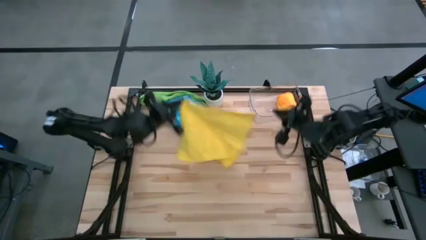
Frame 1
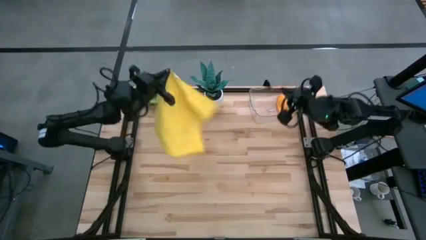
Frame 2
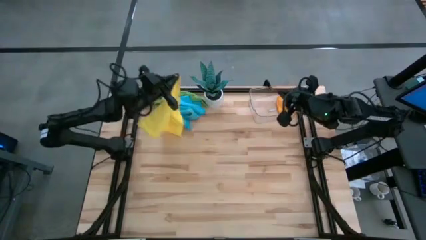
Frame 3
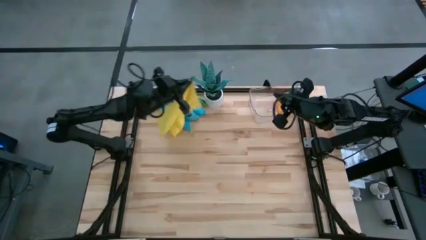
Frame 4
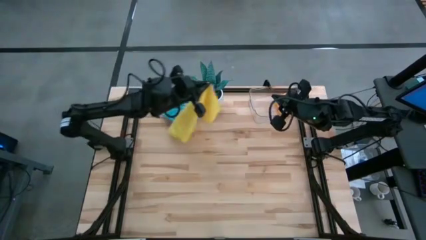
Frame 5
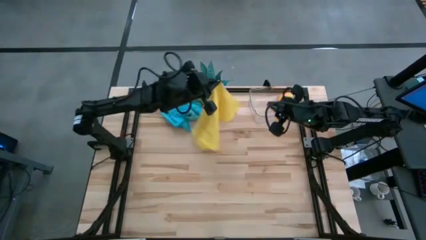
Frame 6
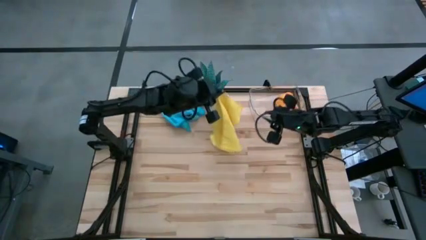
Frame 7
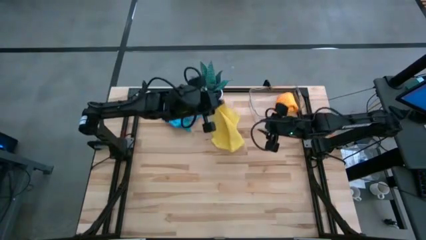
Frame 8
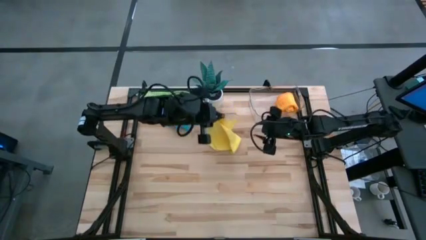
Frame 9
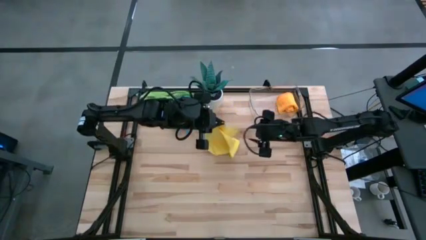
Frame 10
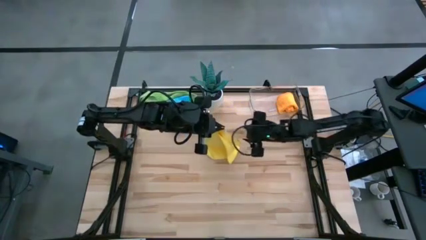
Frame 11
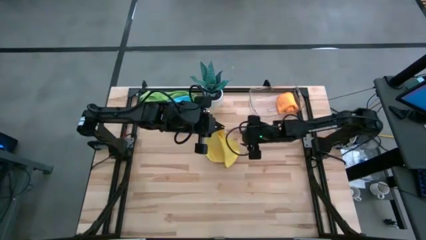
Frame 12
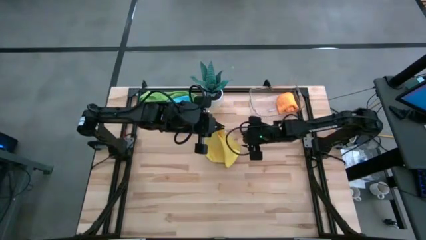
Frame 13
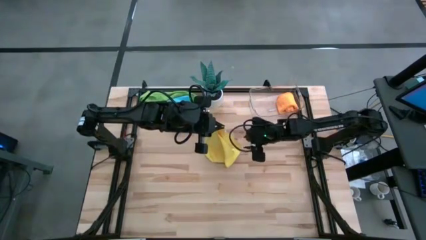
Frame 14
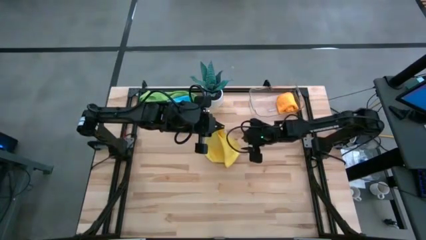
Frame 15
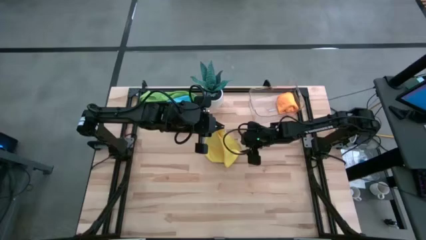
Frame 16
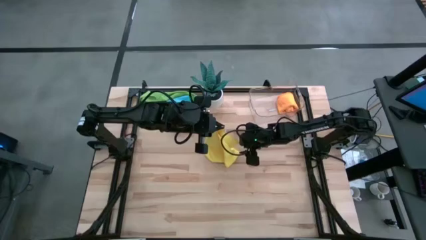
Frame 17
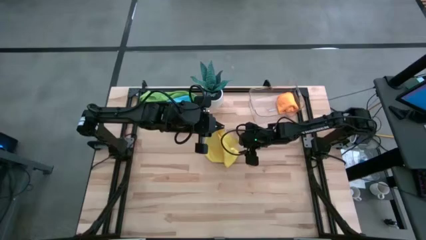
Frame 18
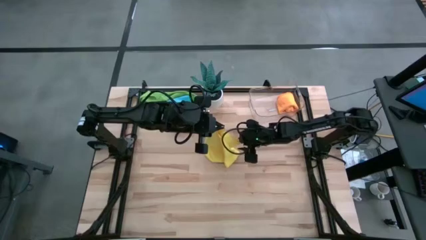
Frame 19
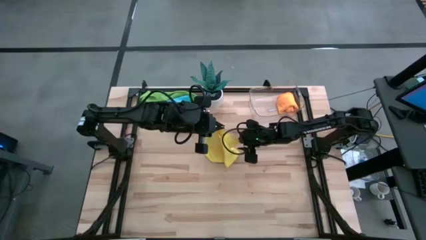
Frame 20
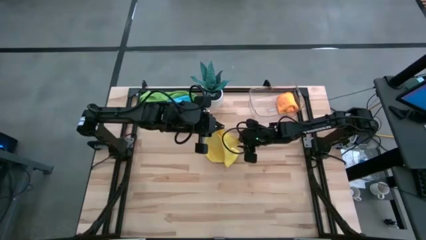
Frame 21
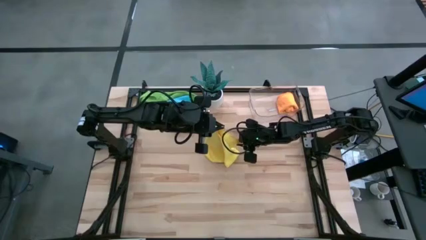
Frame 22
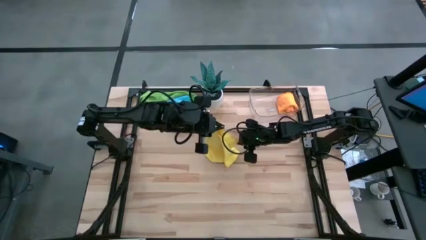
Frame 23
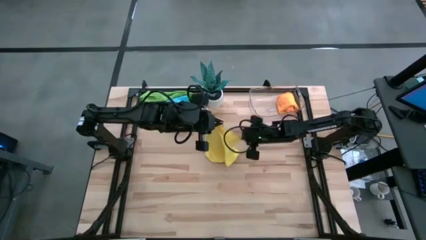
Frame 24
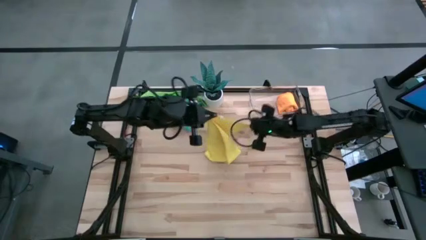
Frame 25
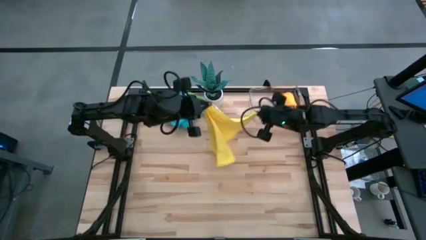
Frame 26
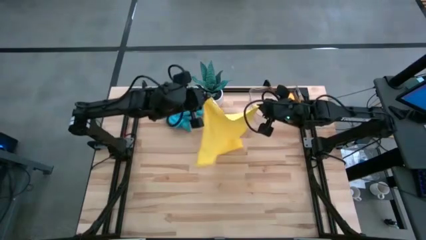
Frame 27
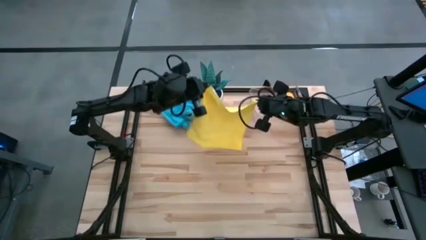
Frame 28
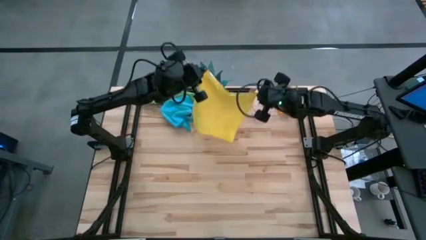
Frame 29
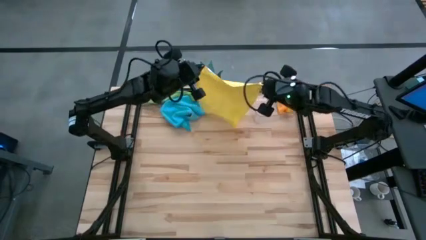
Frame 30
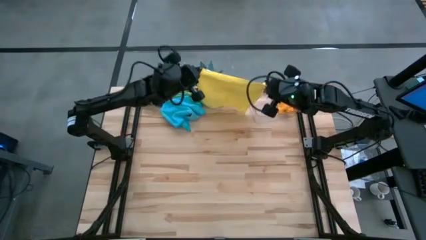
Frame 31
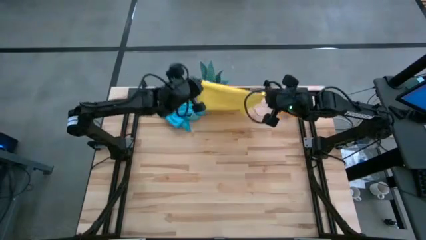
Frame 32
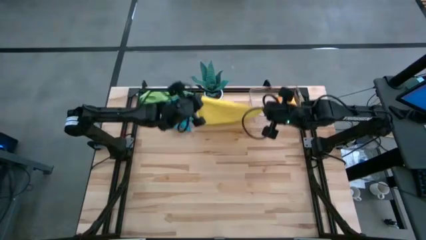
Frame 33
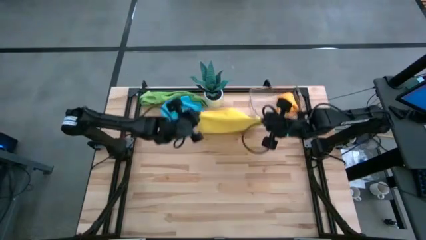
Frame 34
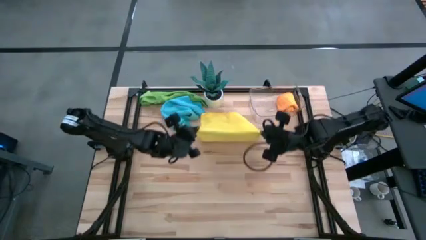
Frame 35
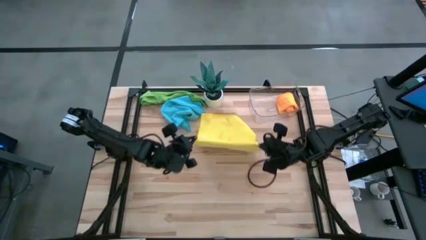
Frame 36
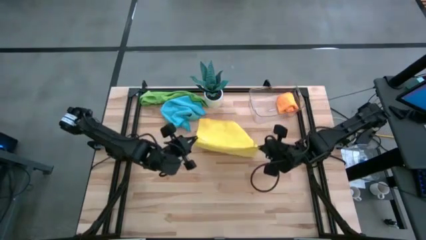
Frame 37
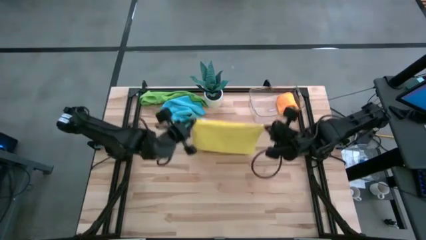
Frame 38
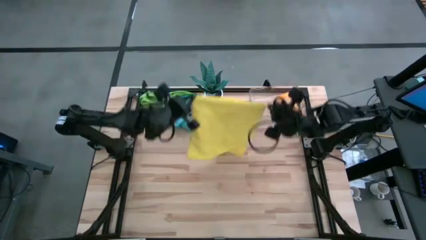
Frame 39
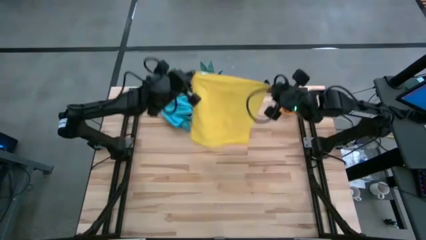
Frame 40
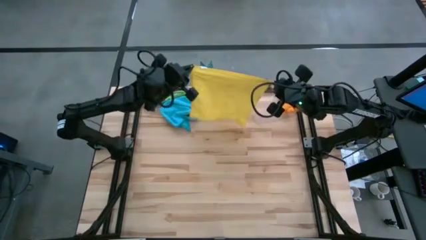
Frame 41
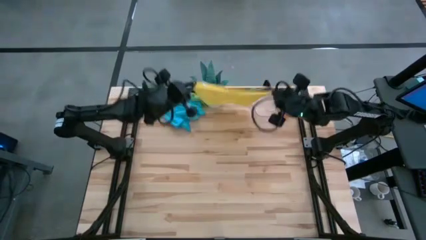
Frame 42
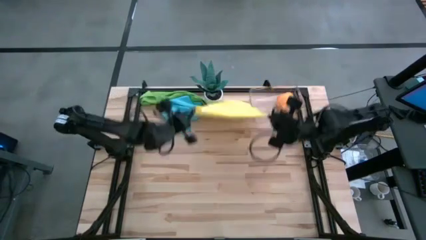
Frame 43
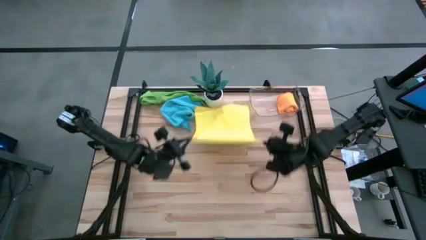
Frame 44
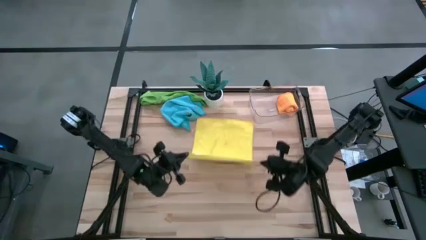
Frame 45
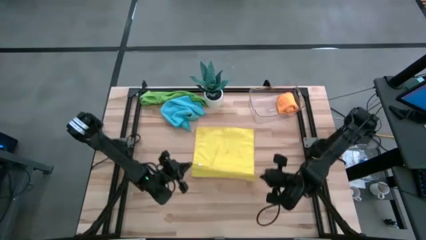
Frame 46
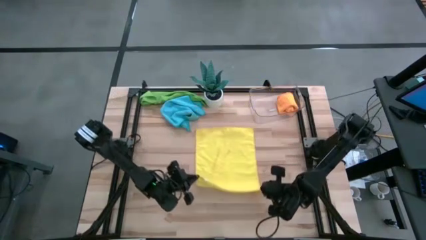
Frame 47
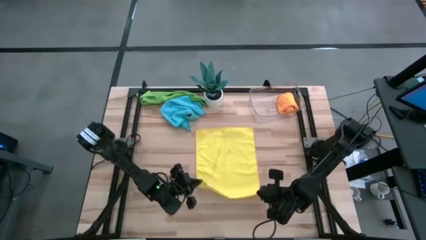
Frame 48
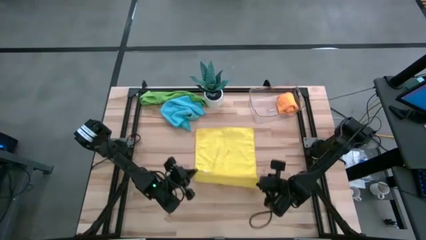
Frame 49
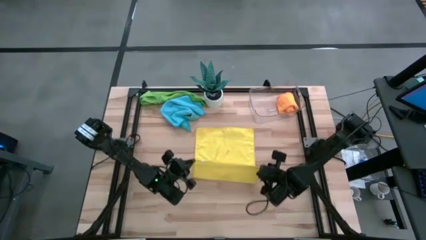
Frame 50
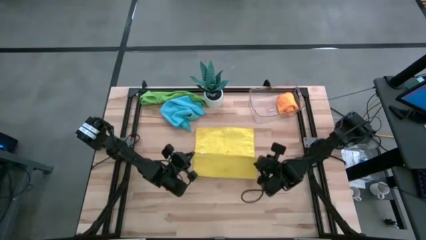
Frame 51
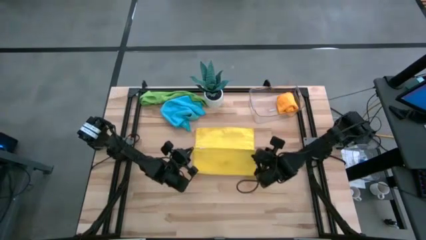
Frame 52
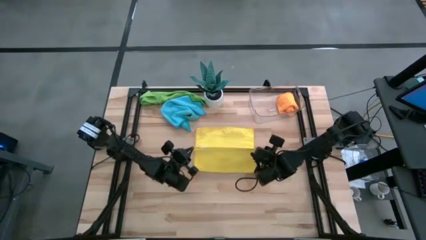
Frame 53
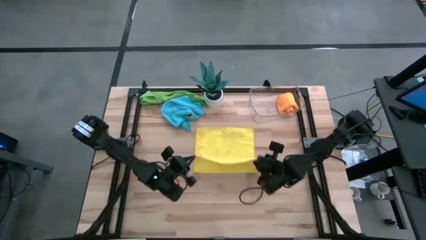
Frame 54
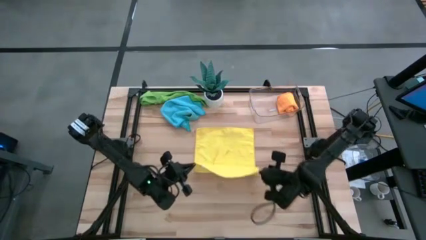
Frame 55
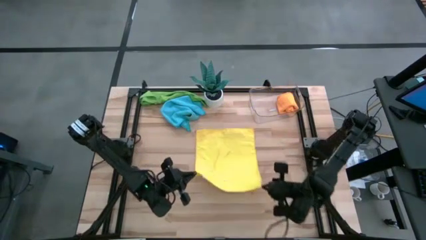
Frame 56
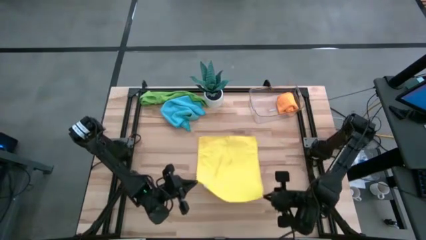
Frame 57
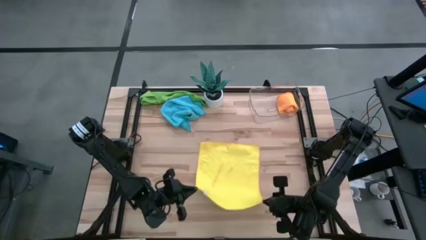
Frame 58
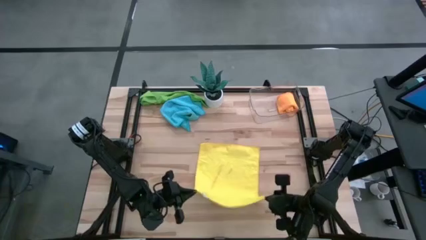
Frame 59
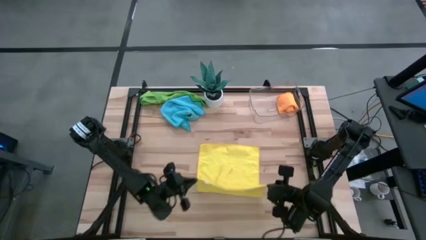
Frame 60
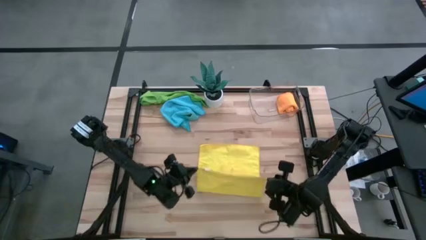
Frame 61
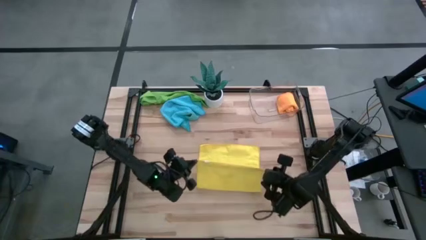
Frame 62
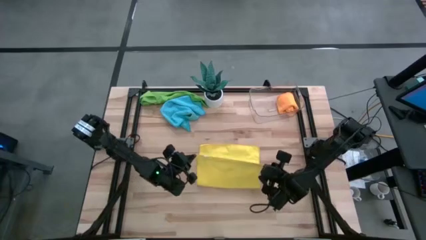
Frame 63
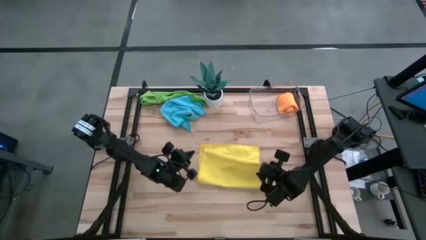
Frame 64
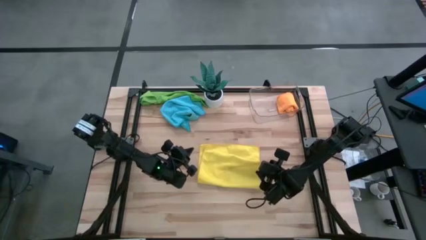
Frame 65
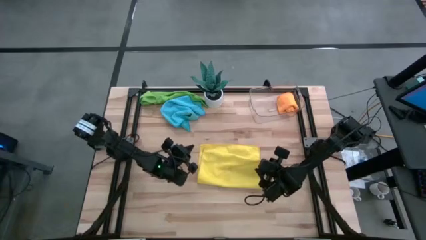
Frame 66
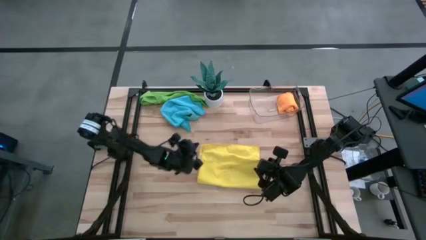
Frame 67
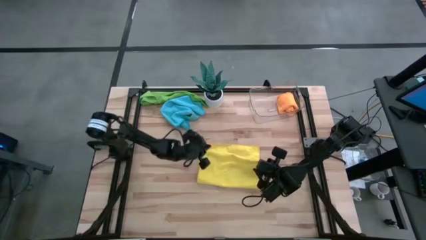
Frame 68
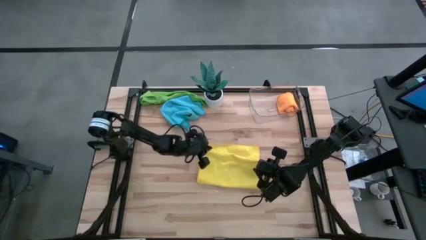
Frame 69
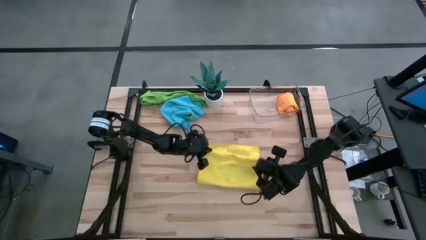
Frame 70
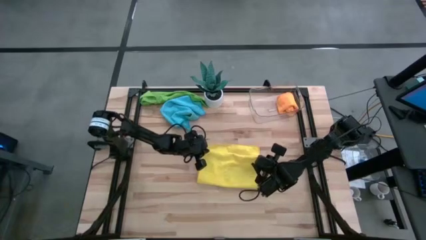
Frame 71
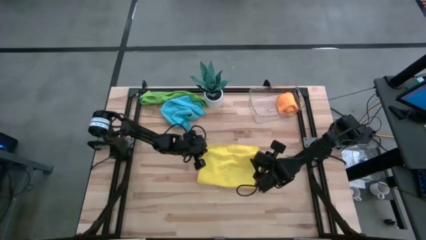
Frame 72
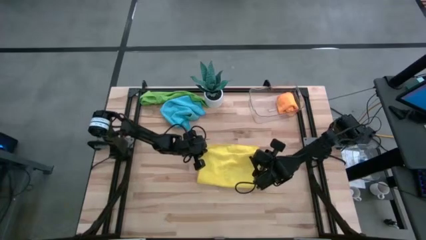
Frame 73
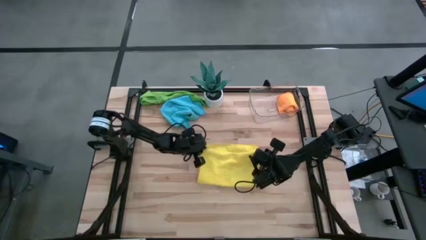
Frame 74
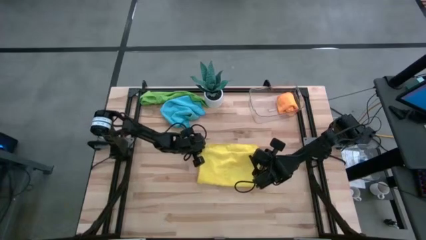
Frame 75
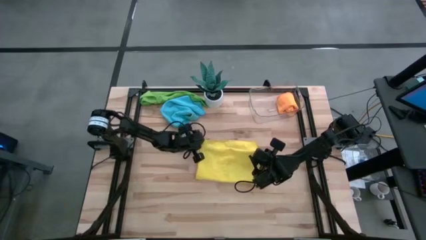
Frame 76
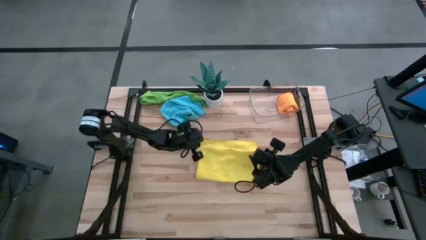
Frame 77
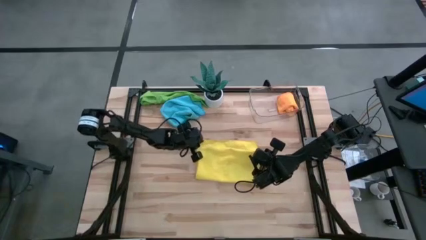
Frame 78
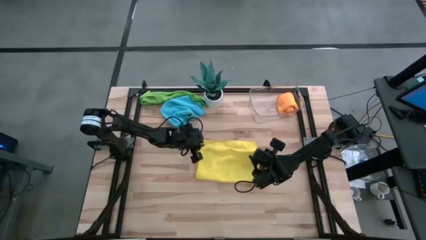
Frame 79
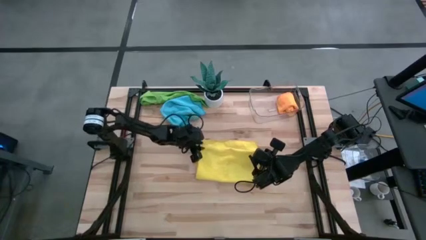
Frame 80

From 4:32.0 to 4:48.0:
Task: Roll microfiber towels into tight, uniform cylinder then place into a basket
Fold the yellow microfiber cloth

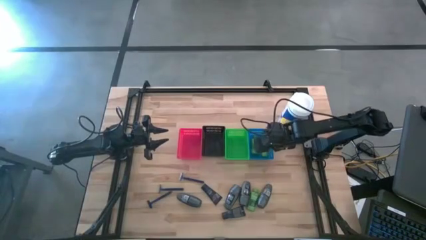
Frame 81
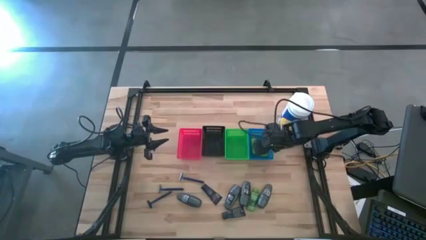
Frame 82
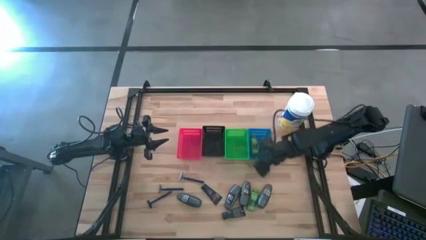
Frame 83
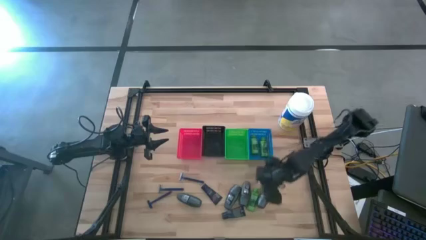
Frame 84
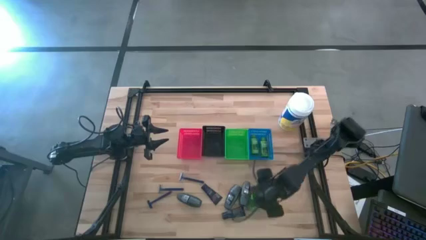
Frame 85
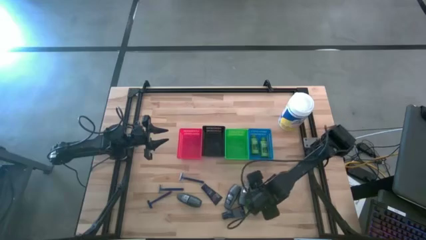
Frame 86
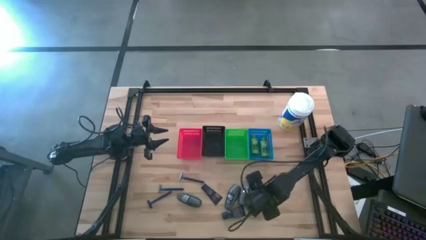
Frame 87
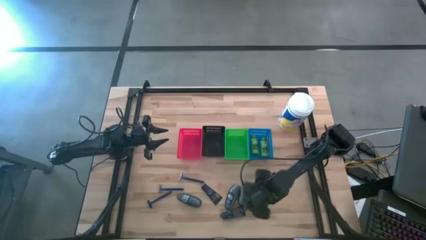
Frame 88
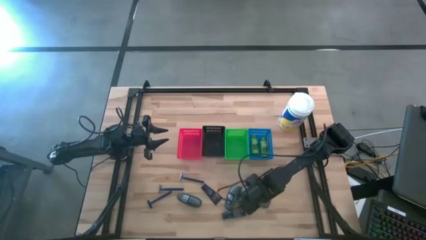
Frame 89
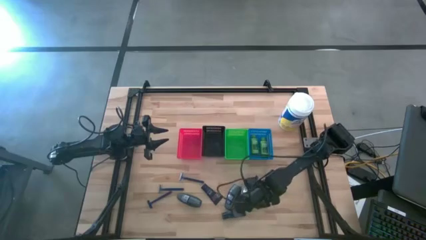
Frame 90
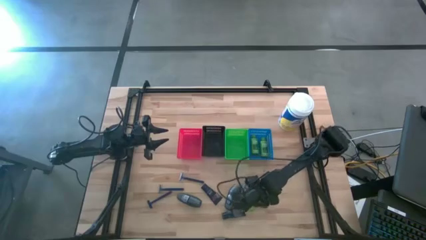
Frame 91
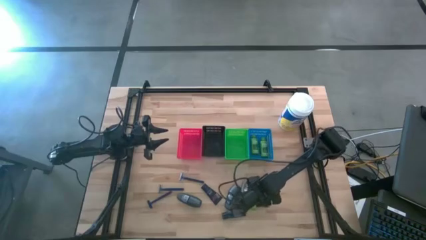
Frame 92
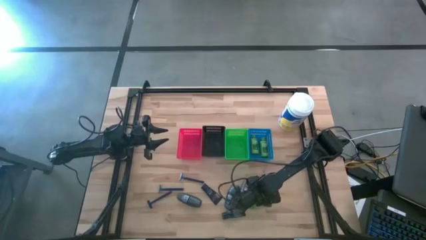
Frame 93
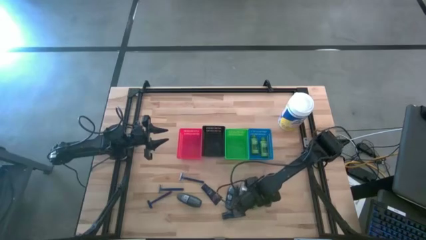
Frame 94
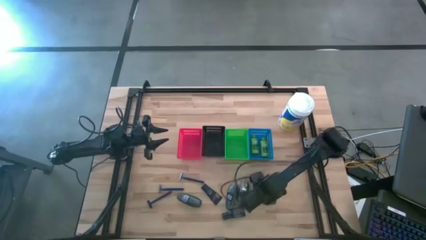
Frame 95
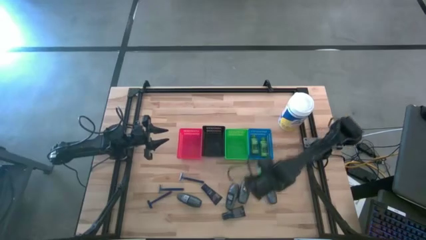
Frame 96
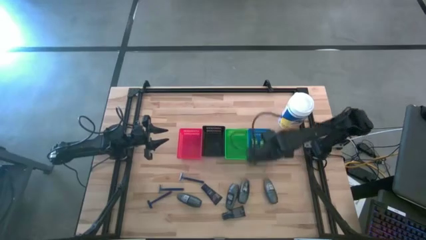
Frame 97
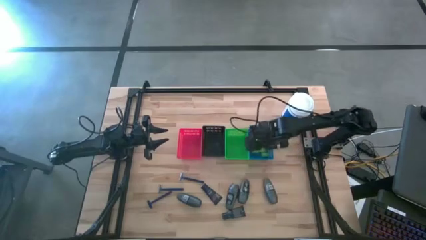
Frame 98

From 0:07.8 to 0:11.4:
Task: Pick & Place Travel size toiletries
Put the green shampoo into the blue bin
